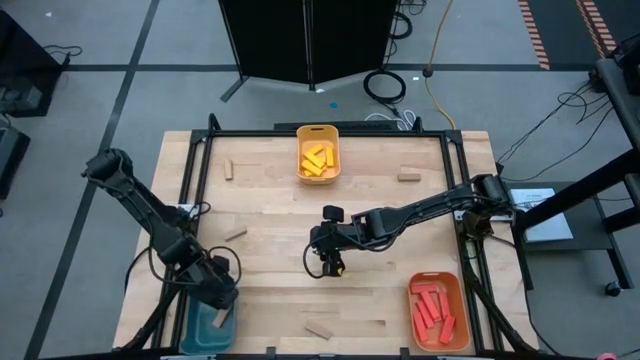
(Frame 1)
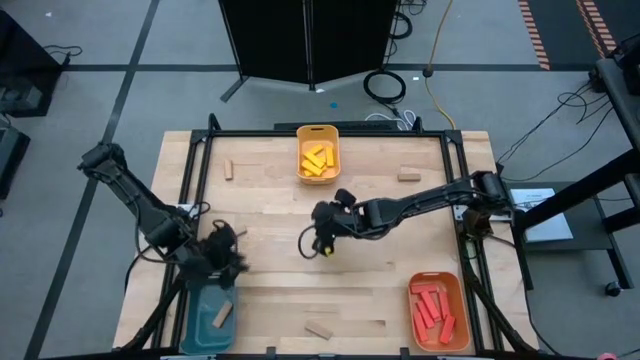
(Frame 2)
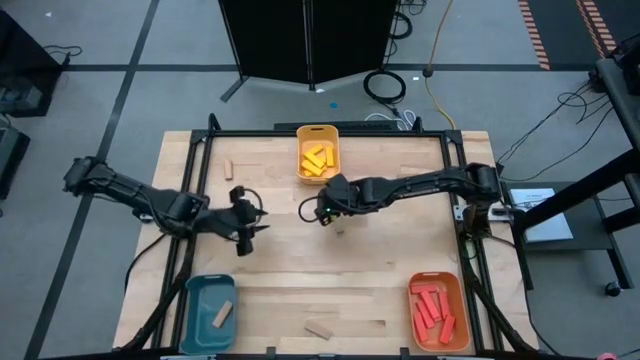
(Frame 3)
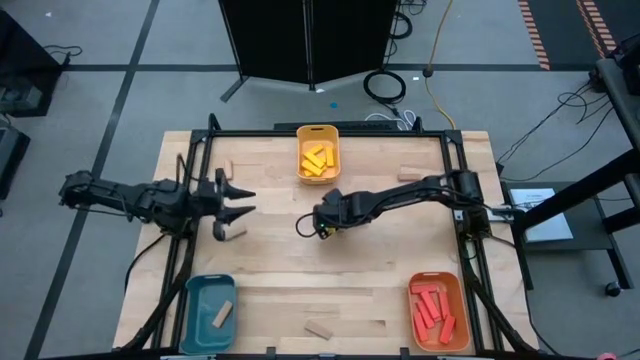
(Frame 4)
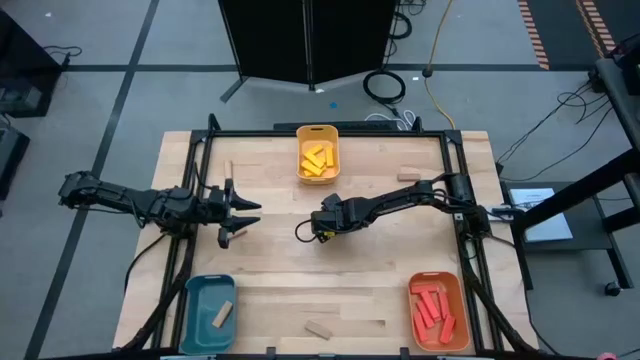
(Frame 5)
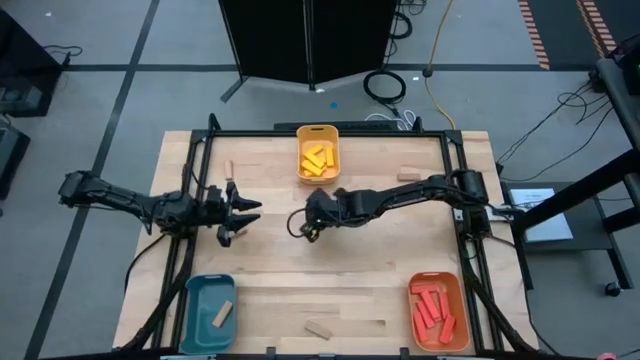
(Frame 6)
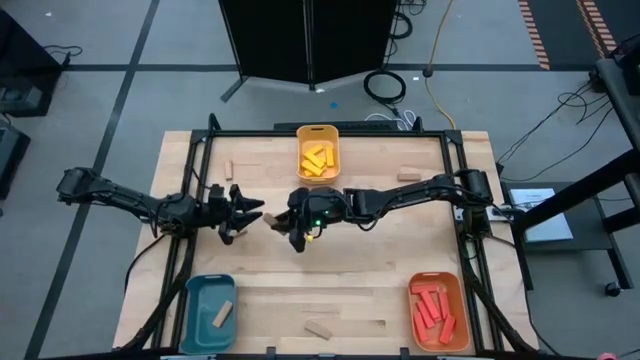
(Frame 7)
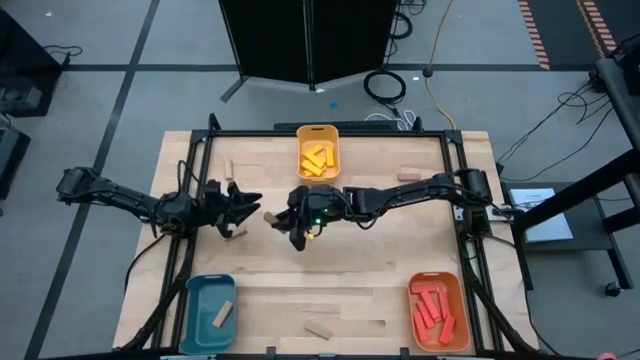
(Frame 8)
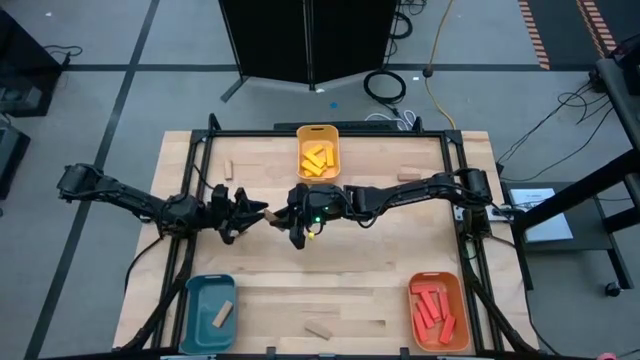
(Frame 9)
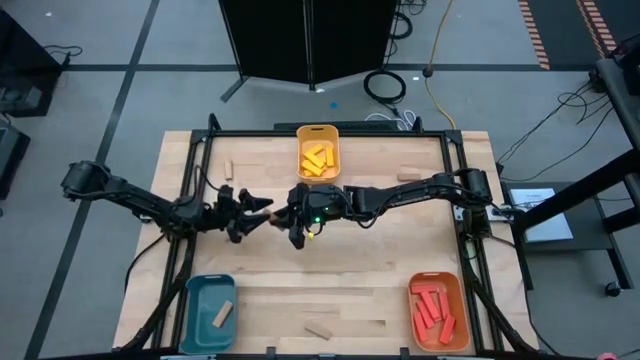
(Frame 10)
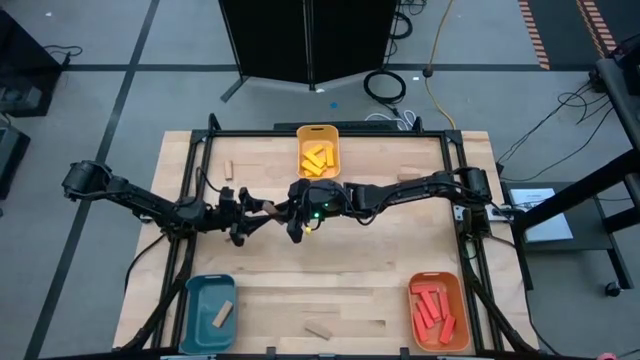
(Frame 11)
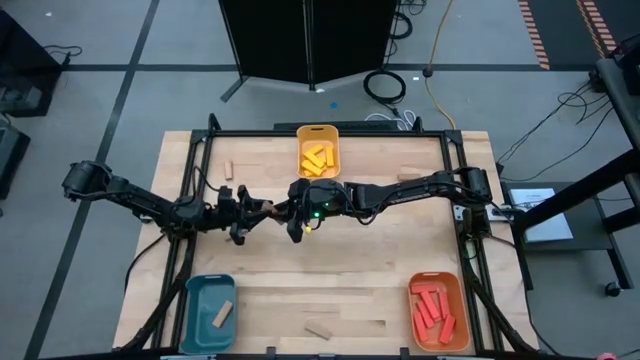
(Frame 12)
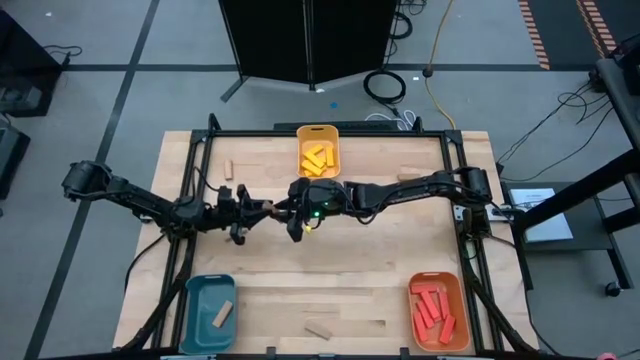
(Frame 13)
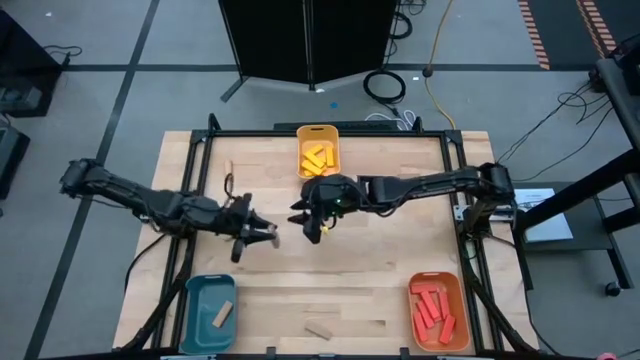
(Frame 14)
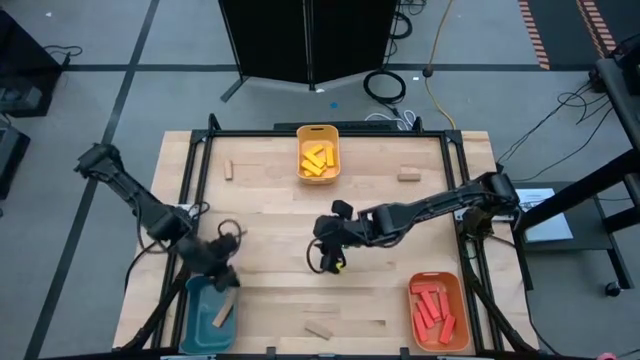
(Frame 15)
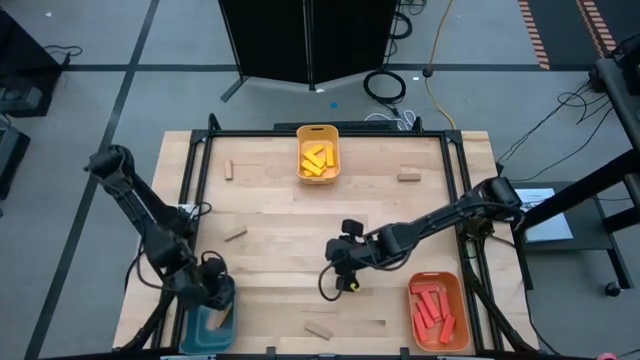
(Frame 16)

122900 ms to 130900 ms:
Task: Sort blocks
Put the brown block into the blue bin

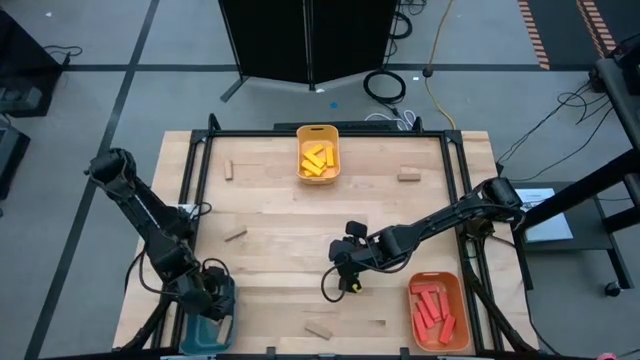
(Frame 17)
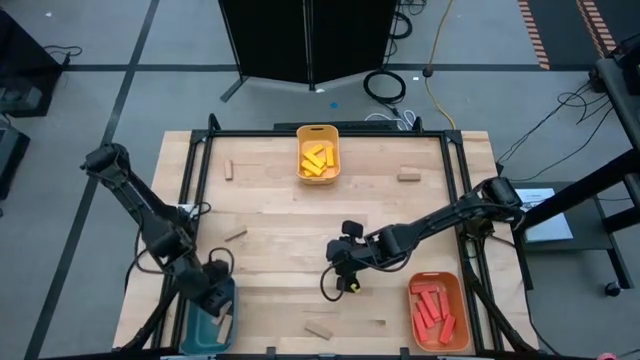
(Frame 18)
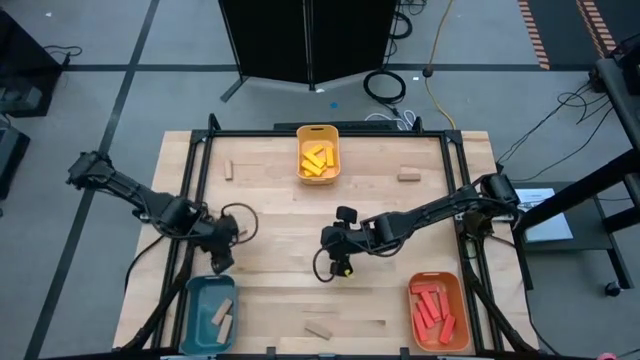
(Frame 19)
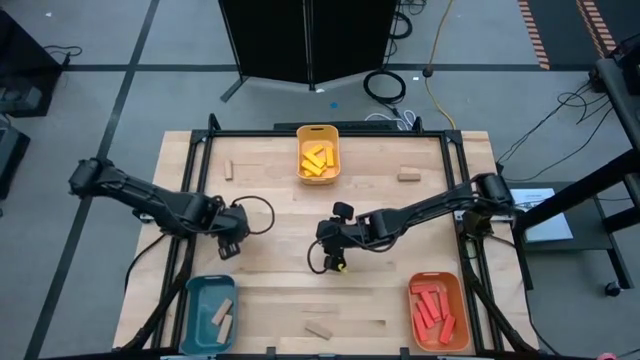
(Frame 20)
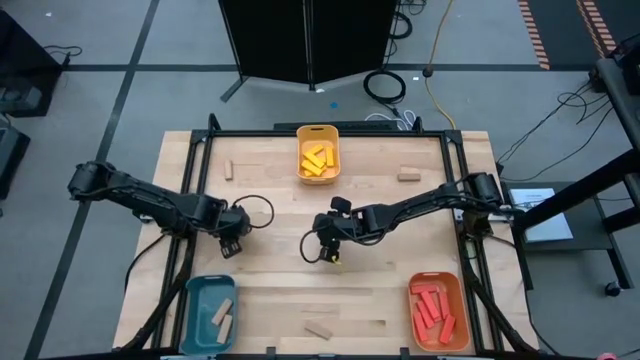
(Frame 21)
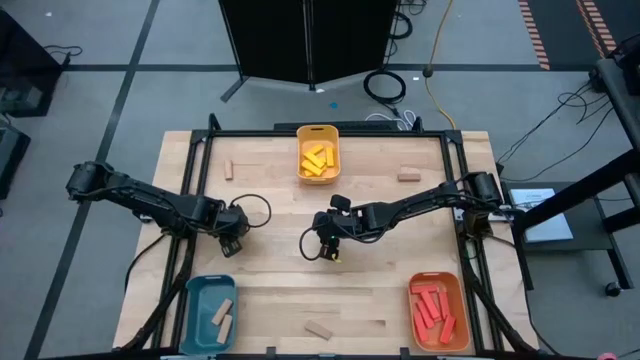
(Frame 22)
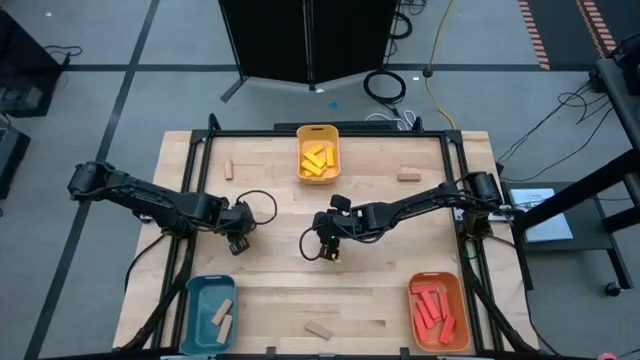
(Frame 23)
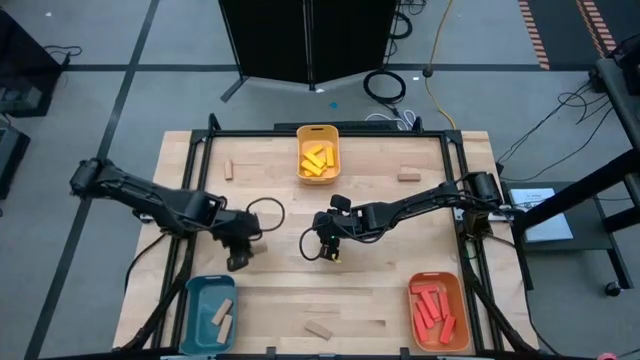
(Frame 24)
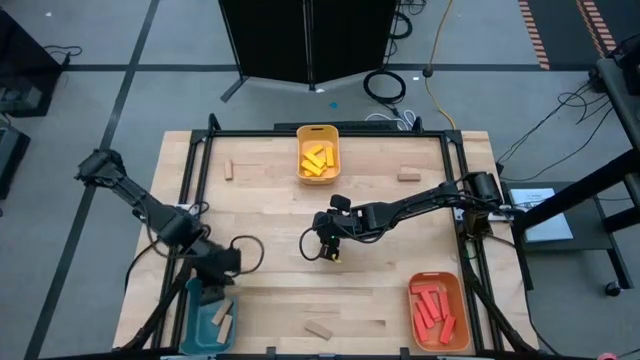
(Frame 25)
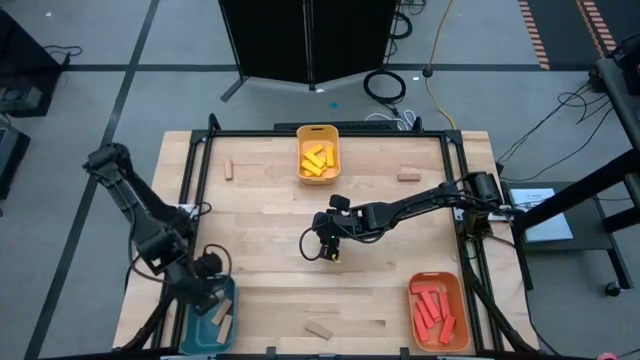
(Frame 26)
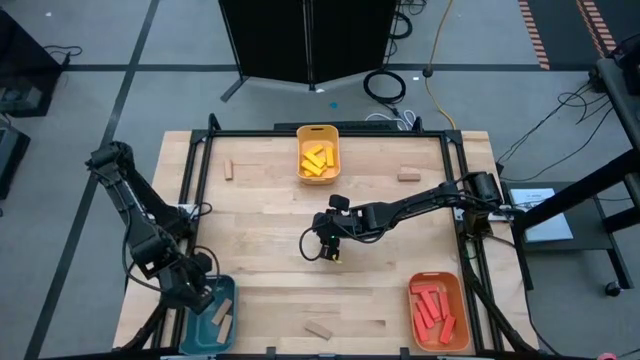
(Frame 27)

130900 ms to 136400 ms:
Put the brown block into the blue bin

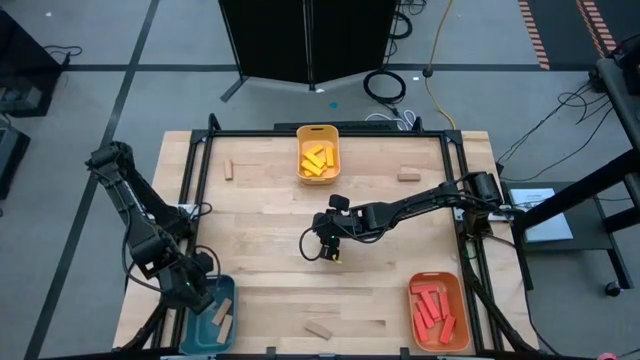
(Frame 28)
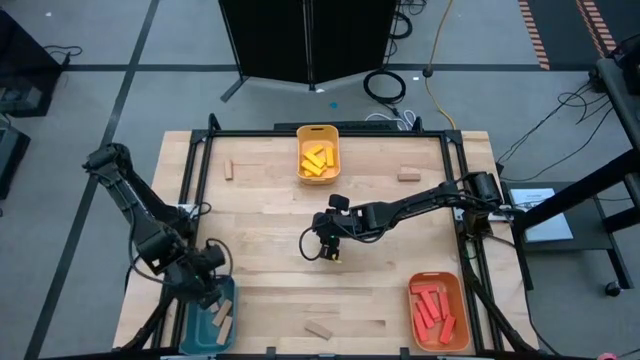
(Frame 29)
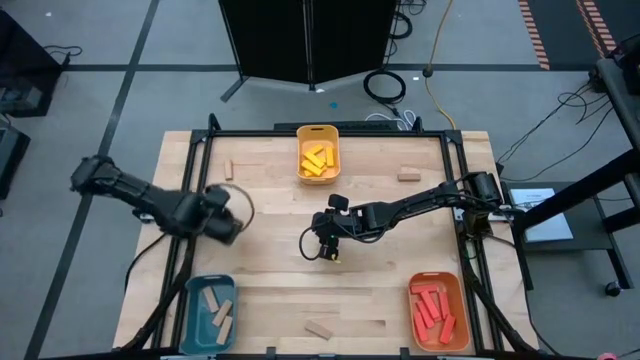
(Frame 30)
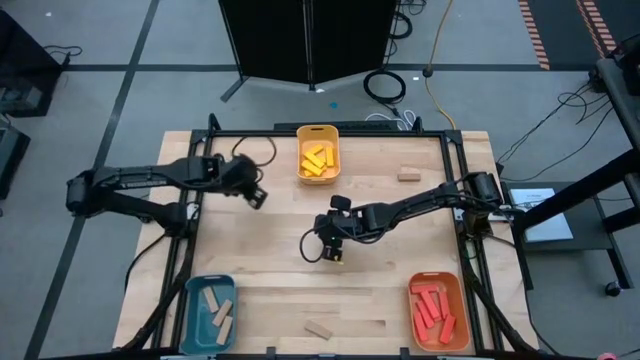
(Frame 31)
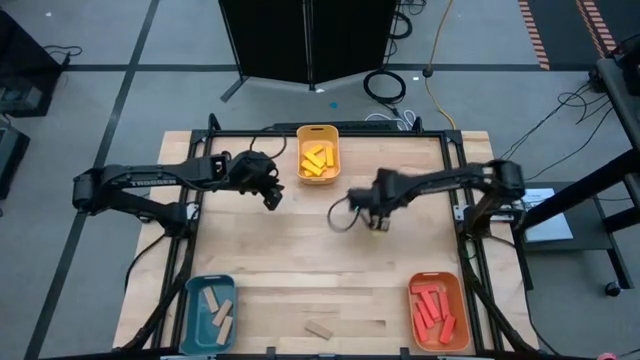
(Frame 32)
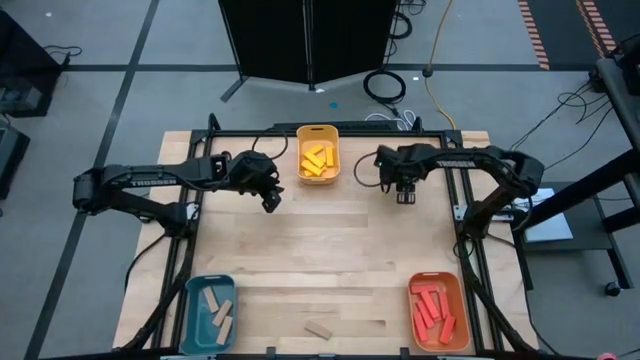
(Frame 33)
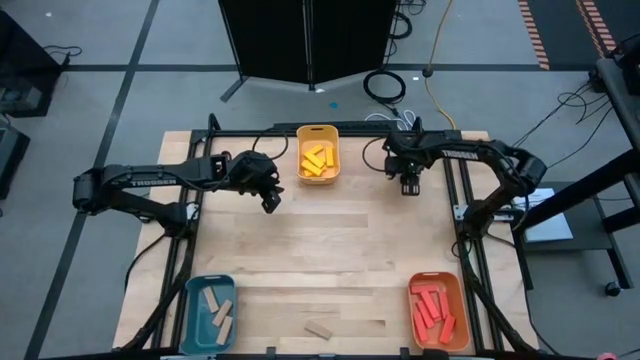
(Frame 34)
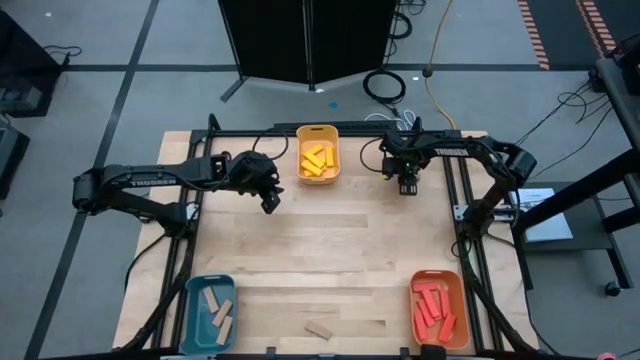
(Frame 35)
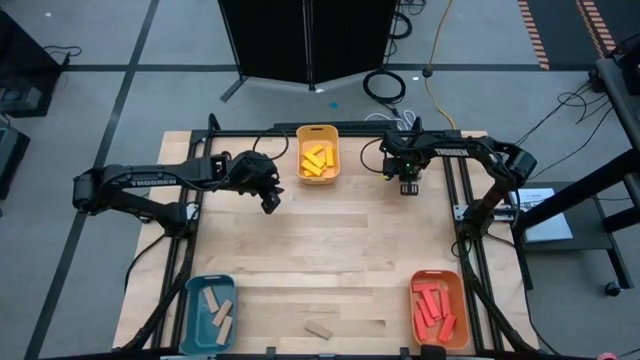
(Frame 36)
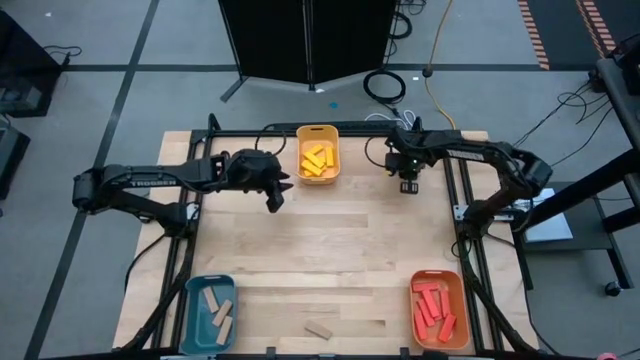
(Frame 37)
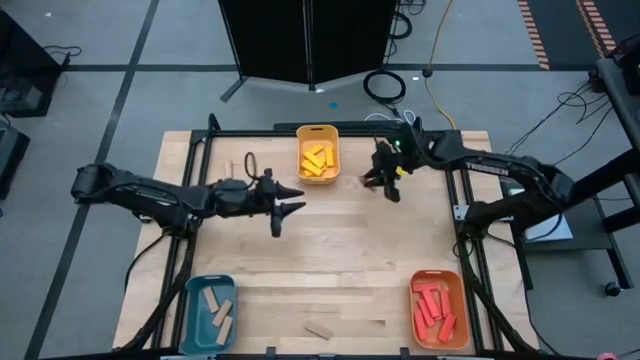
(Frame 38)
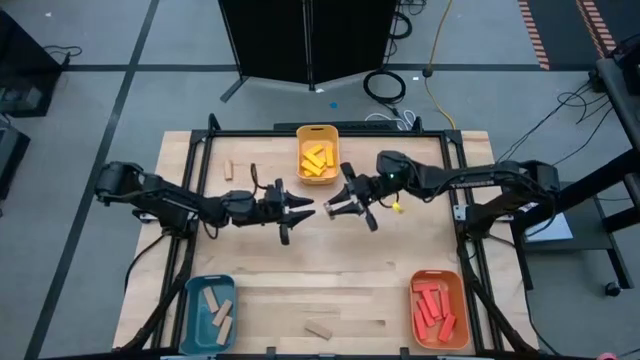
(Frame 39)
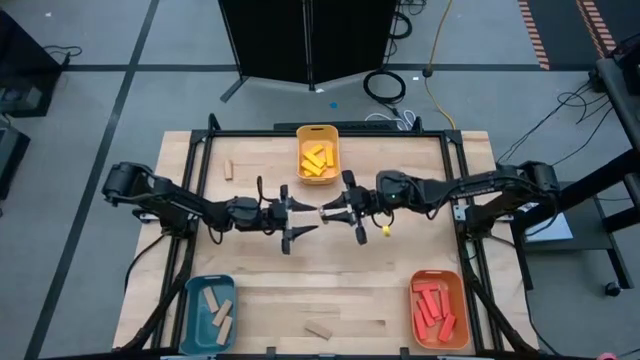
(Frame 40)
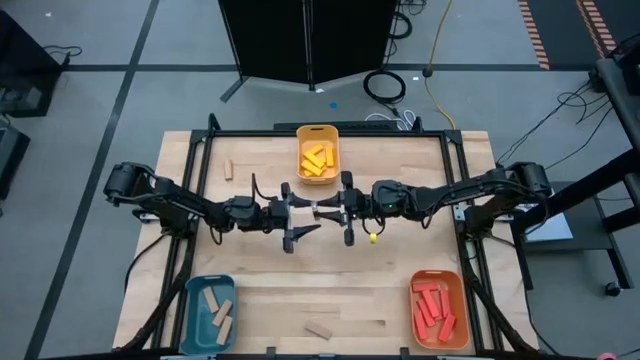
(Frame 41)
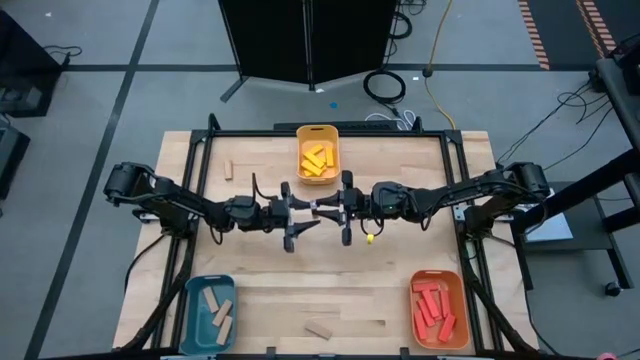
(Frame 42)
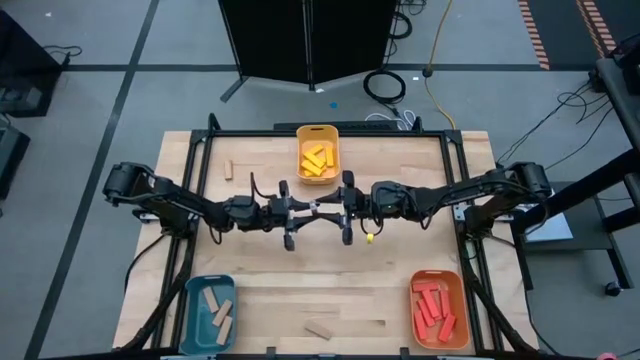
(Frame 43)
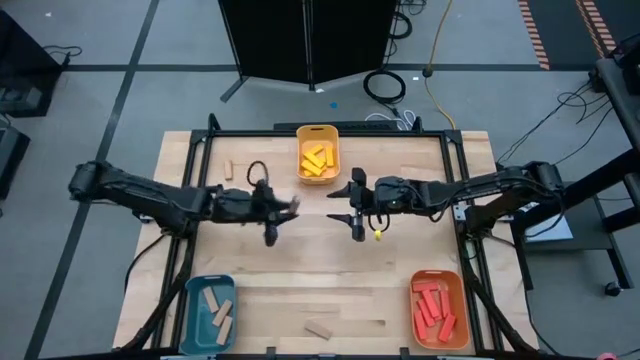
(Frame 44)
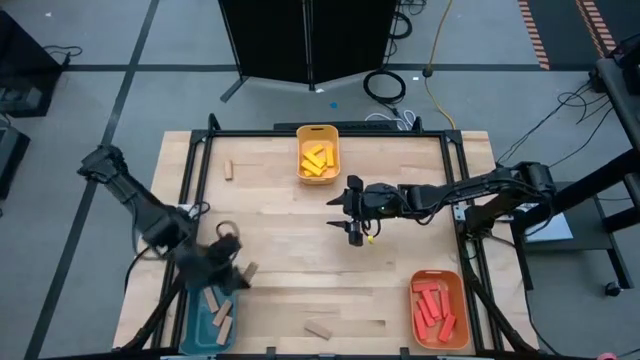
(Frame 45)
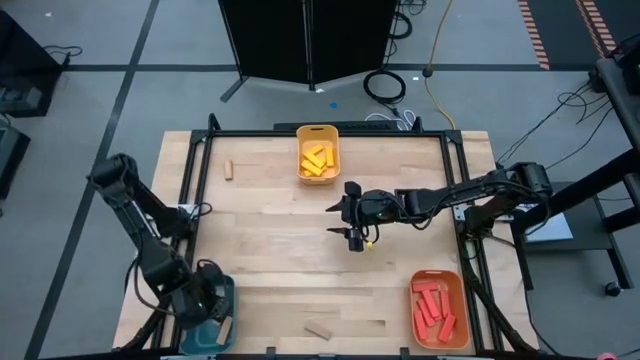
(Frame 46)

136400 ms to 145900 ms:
Put the brown block into the blue bin
